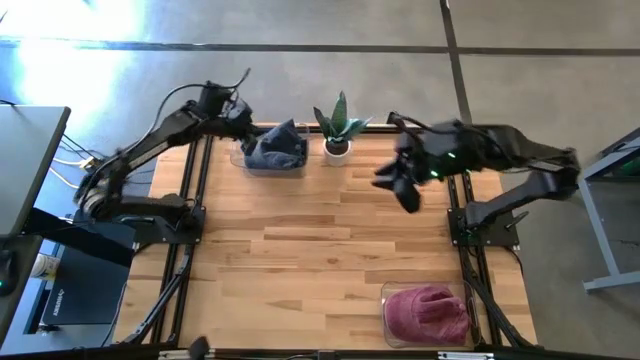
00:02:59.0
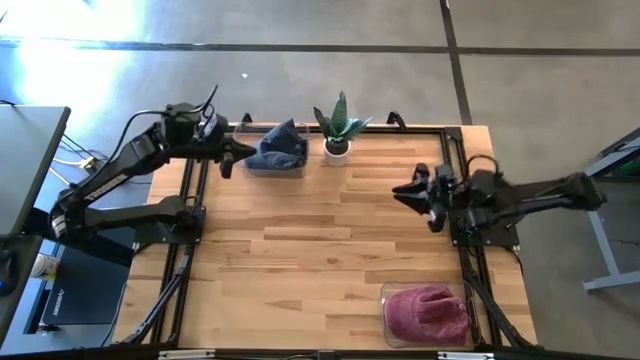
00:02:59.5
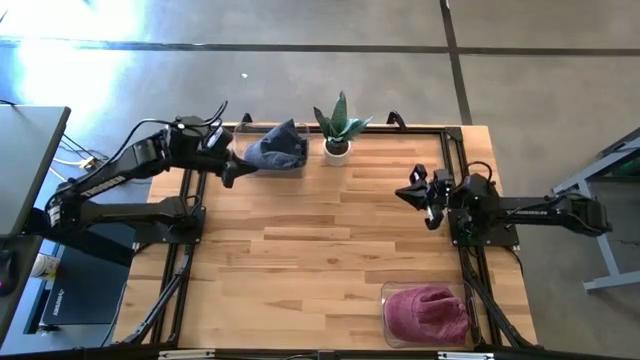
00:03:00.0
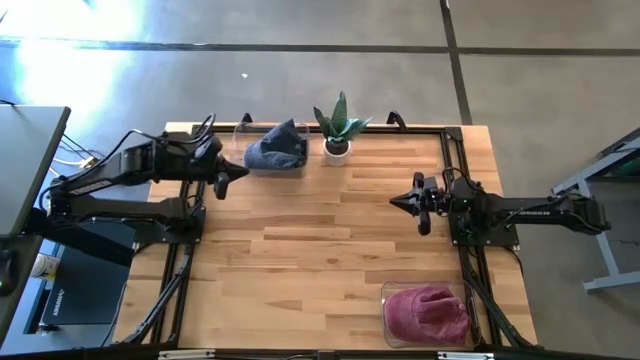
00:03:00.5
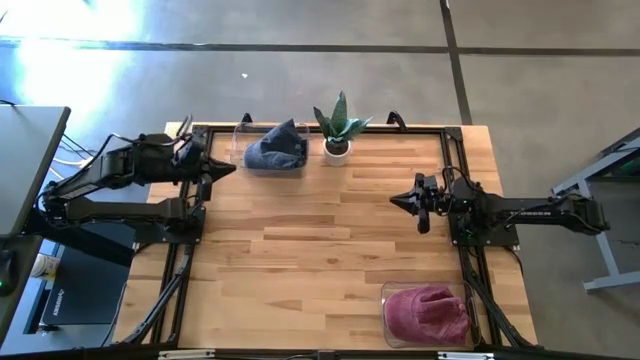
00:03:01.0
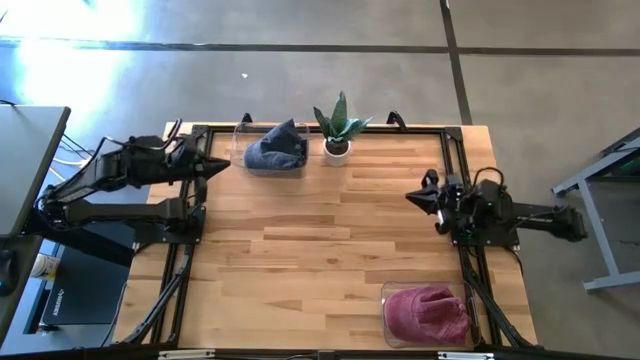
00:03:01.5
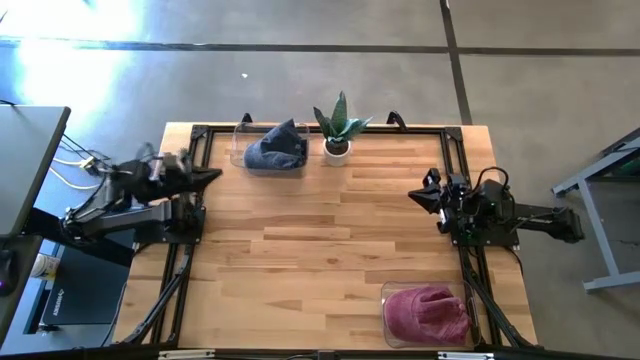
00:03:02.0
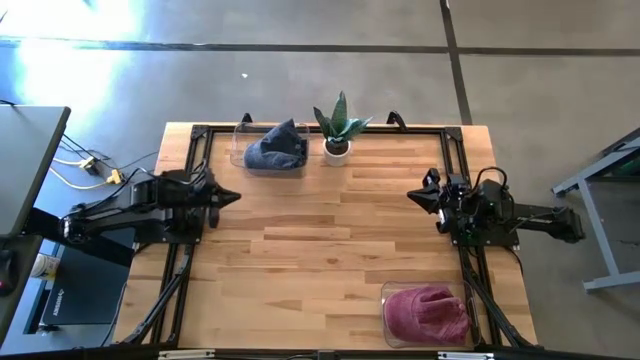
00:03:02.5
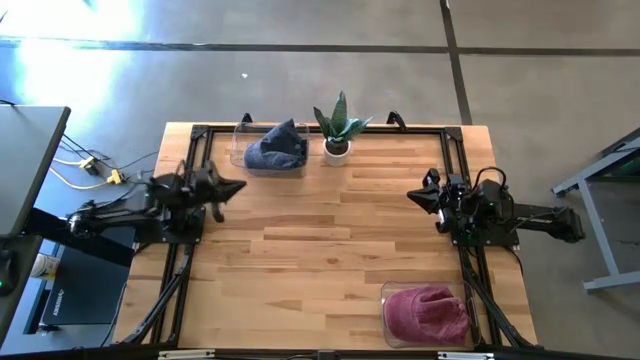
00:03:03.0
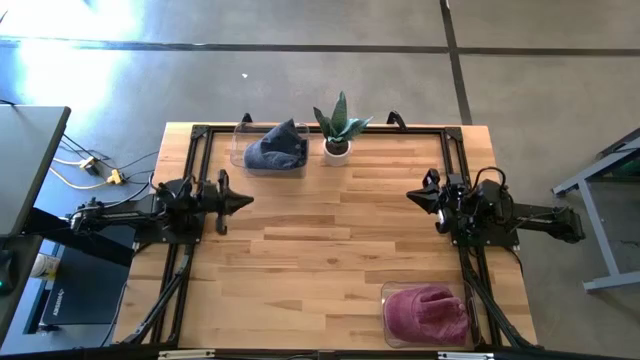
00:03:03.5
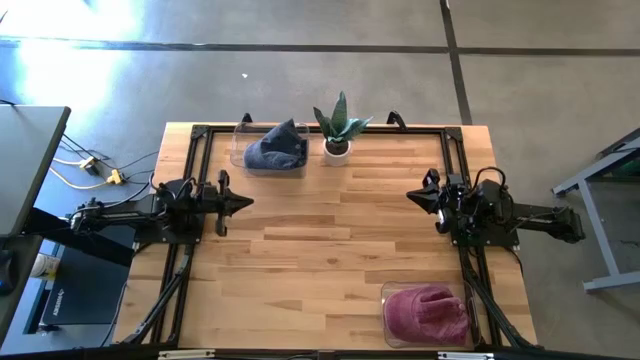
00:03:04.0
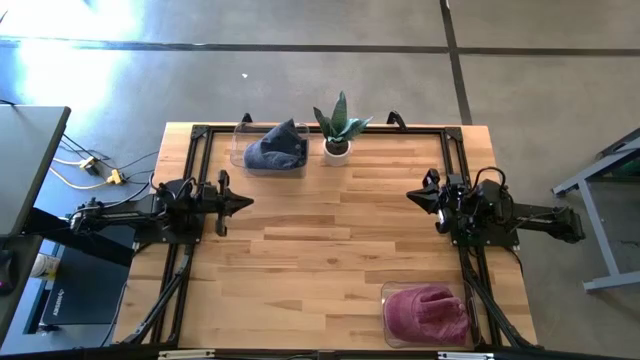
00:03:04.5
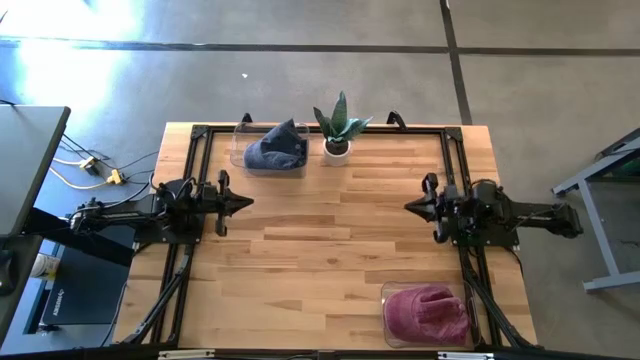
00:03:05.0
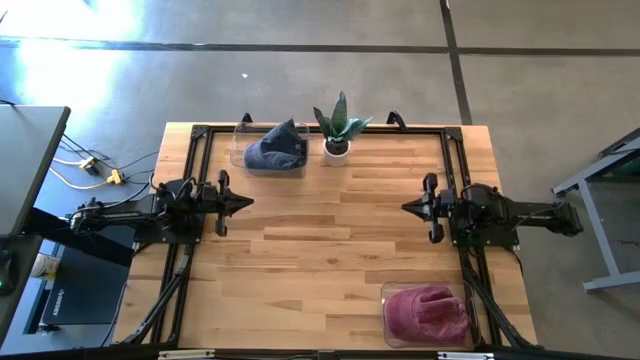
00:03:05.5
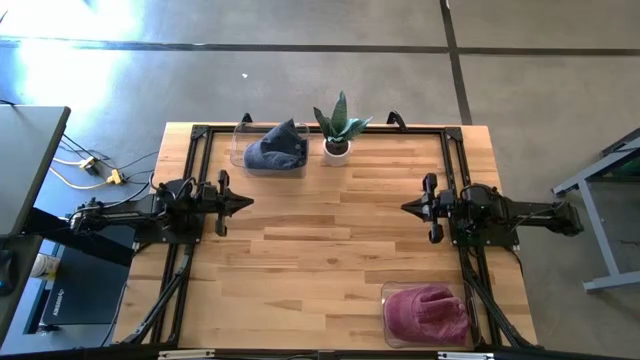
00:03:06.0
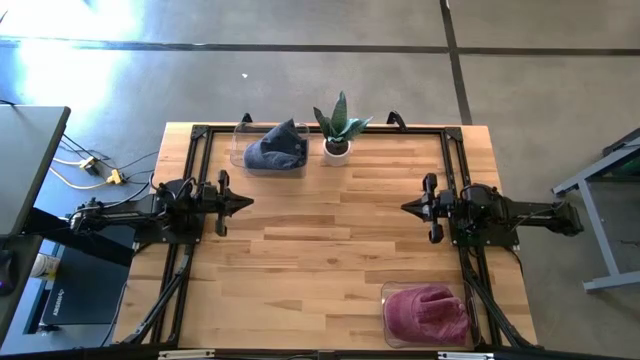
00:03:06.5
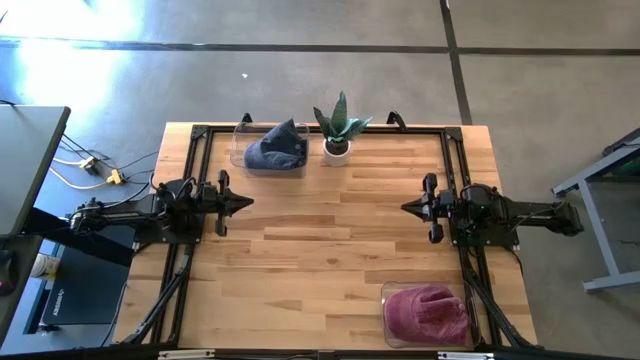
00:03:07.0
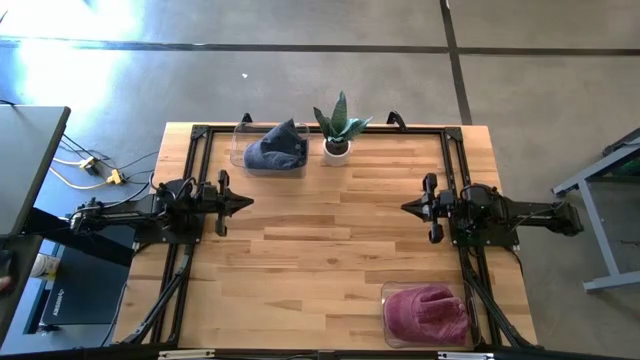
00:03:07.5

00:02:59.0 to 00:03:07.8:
Task: Pick & Place hat
Return to Home Position

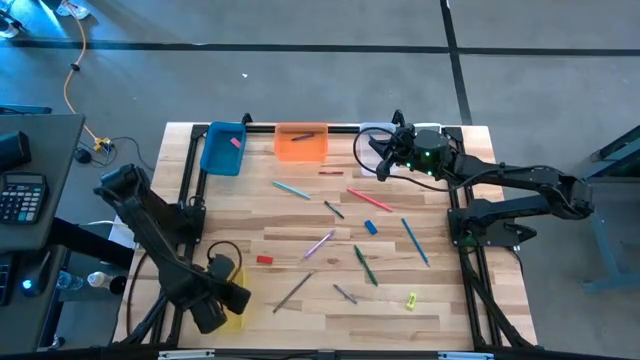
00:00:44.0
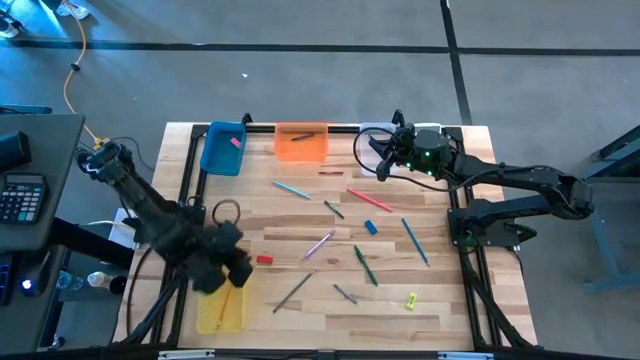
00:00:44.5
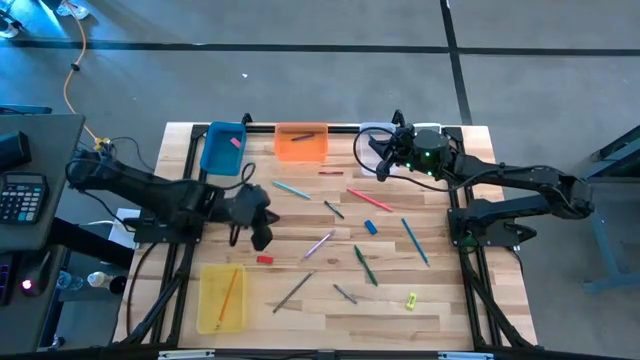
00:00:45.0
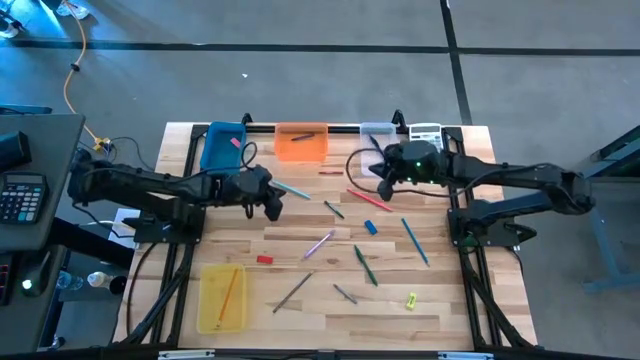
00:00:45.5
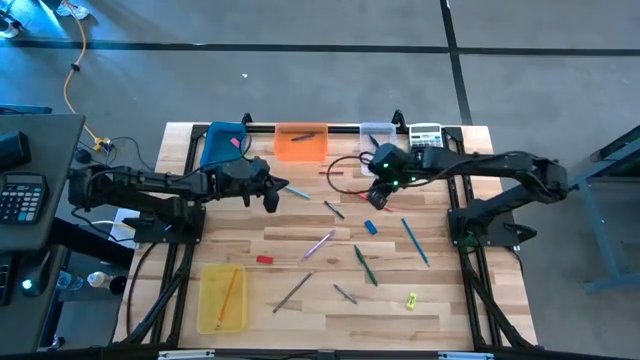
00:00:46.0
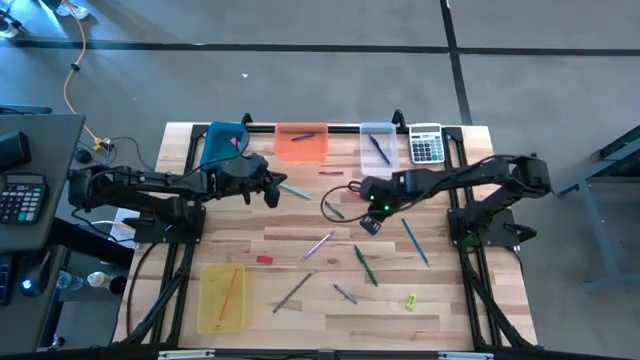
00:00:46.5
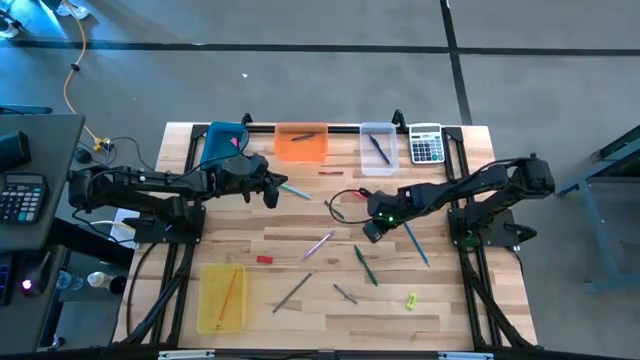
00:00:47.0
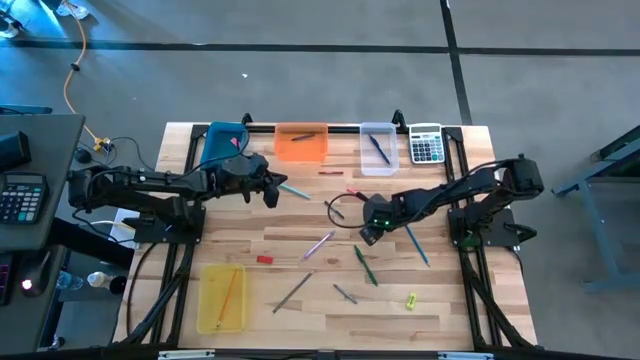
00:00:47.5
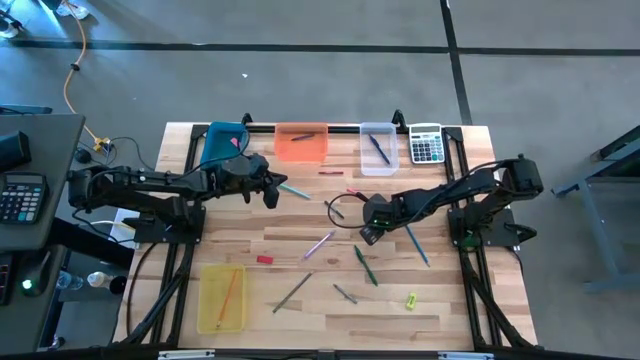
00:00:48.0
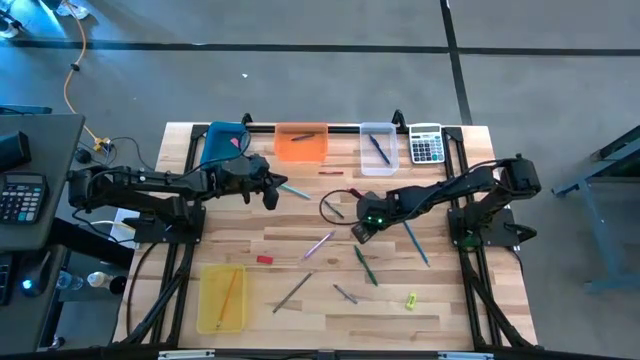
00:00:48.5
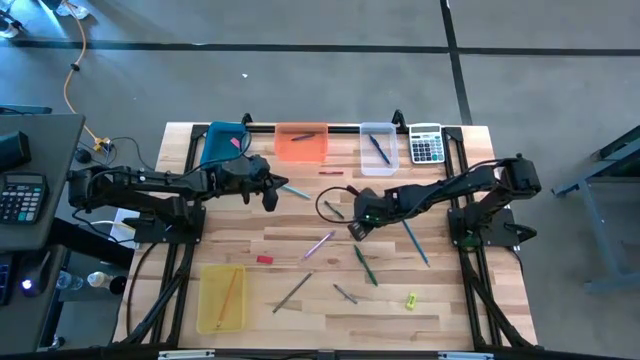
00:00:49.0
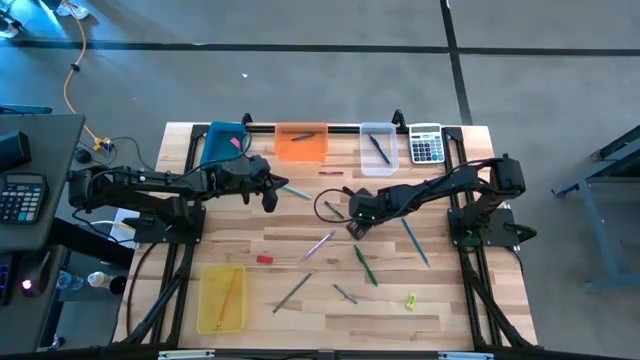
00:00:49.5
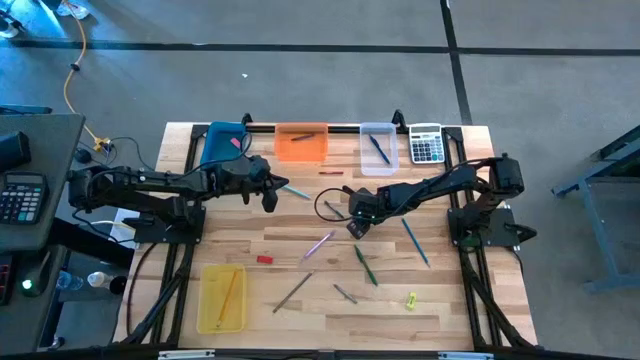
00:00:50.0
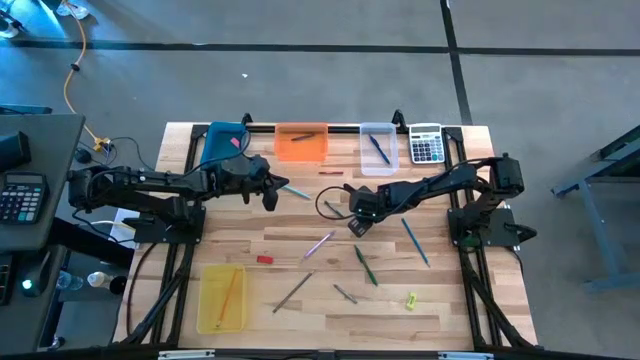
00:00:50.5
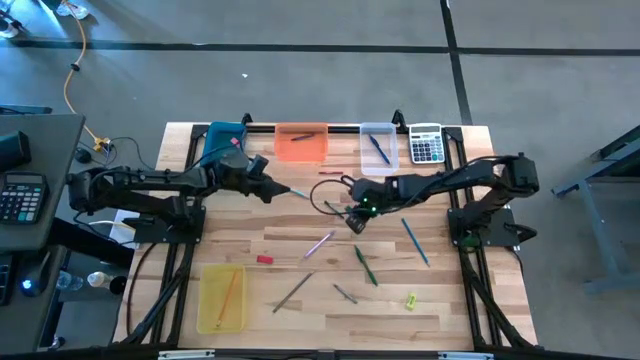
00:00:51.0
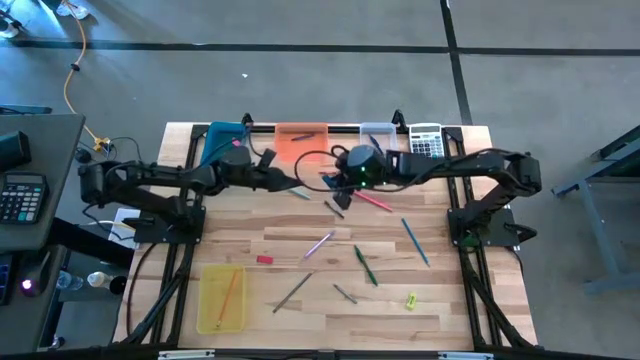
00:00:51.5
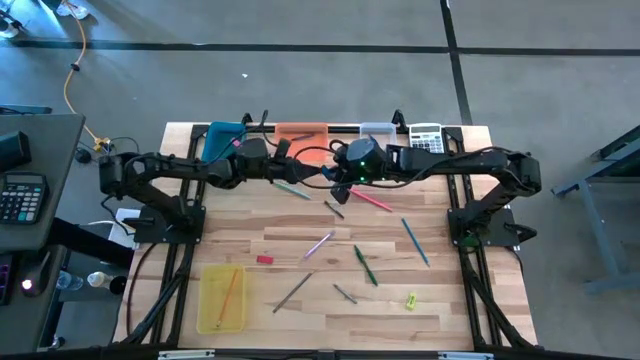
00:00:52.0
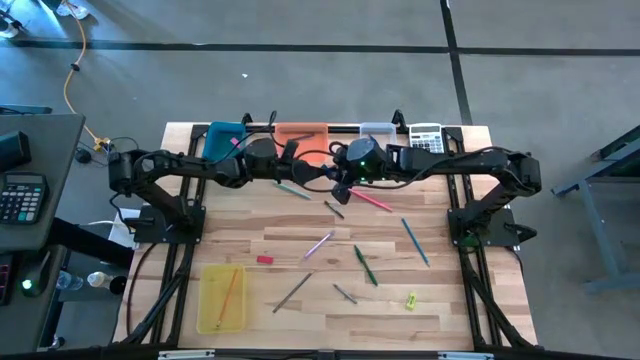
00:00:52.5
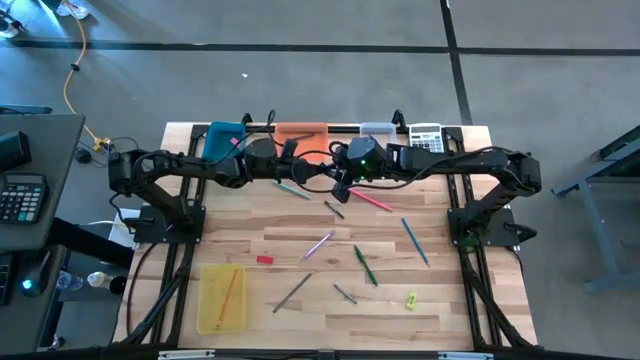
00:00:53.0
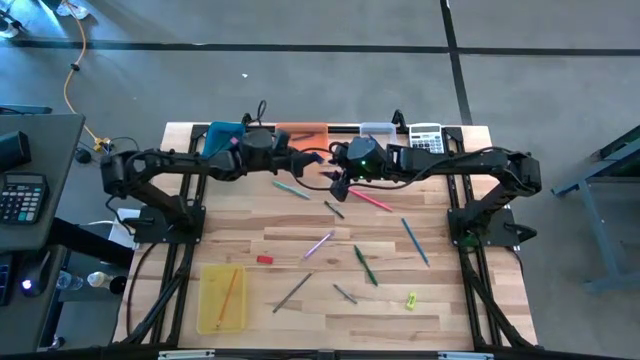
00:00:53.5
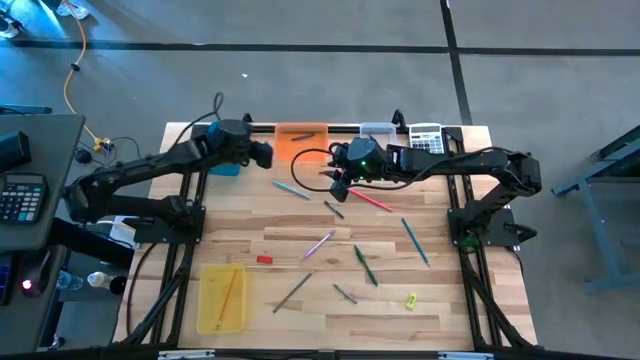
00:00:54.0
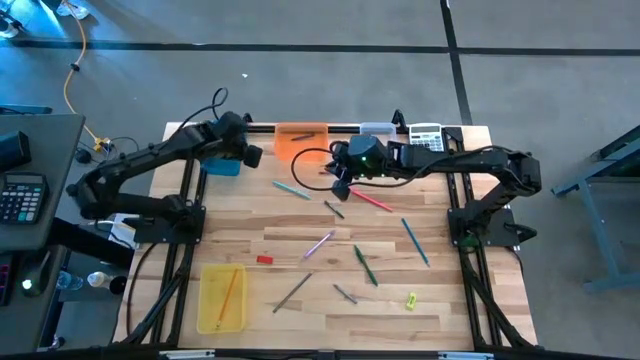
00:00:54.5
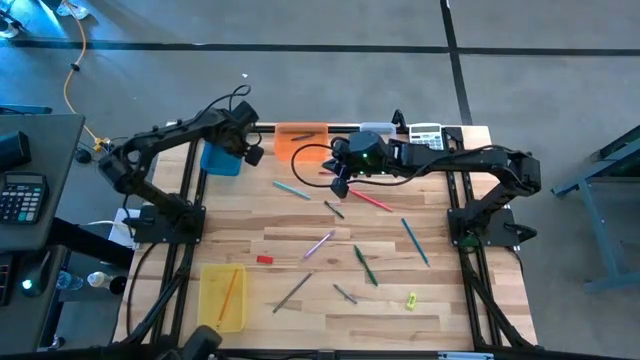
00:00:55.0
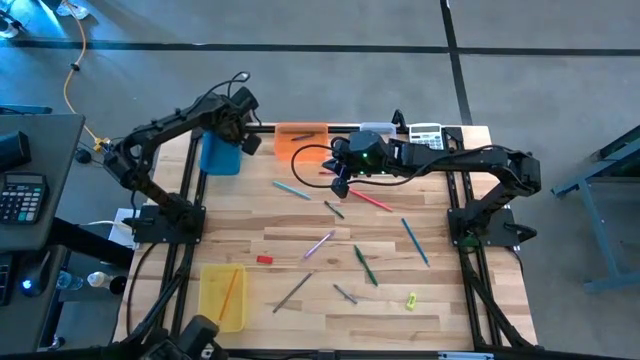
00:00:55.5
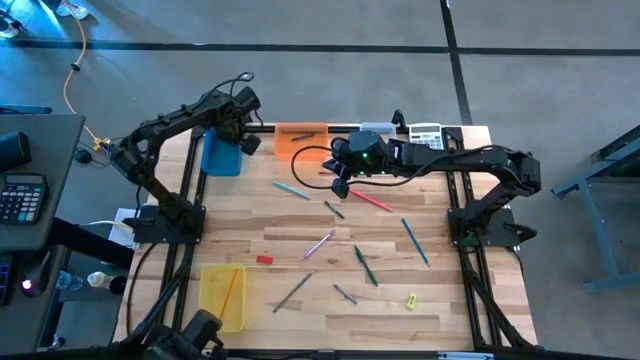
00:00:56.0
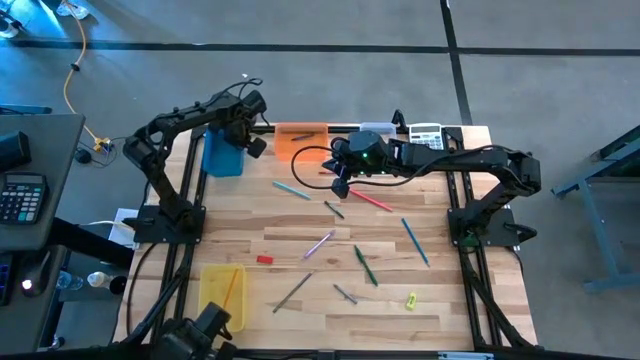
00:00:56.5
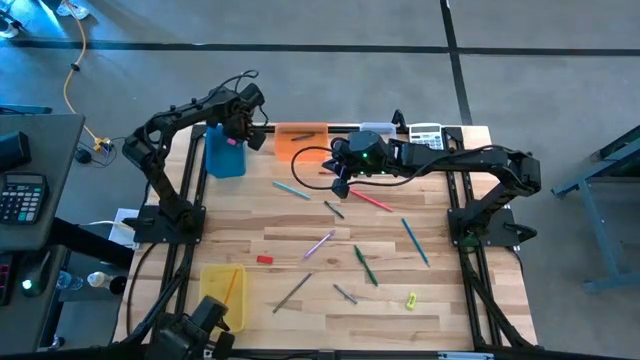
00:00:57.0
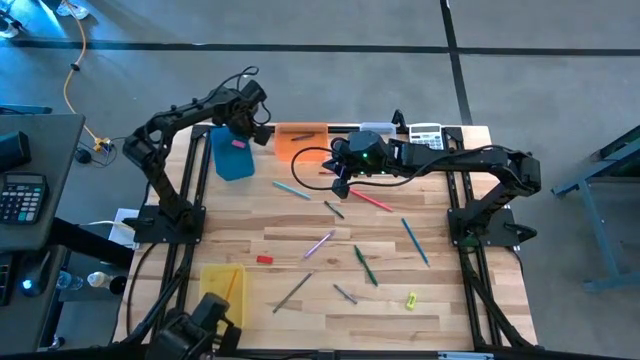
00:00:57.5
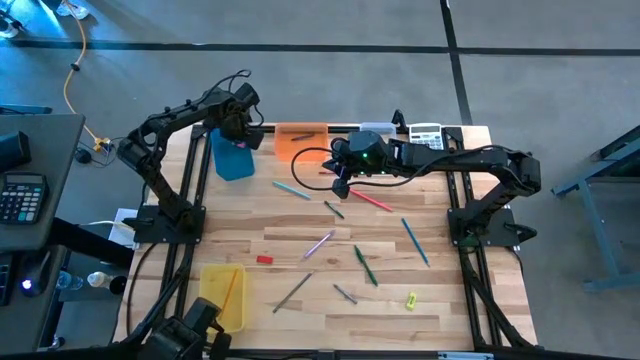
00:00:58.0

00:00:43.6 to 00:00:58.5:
Task: Sort crayons/erasers/pens/pencils in bins
Put the blue eraser into the blue bin
